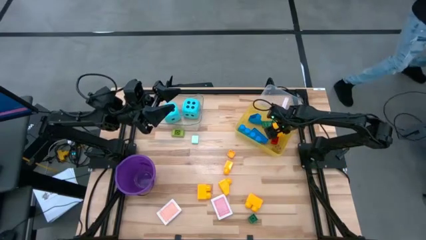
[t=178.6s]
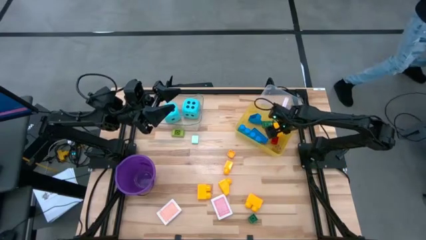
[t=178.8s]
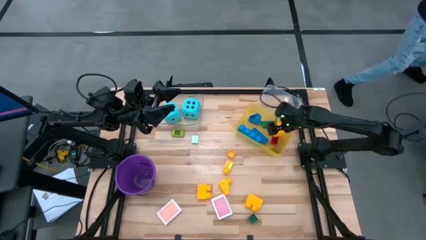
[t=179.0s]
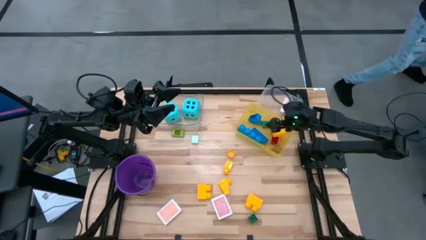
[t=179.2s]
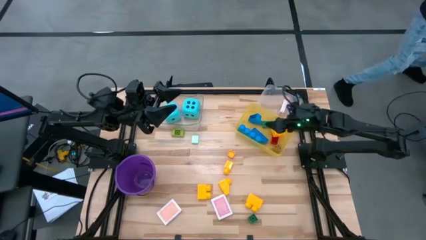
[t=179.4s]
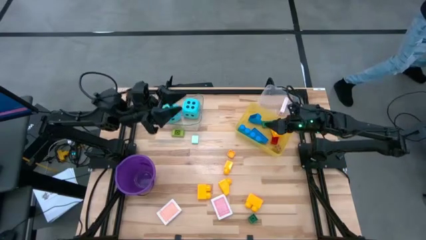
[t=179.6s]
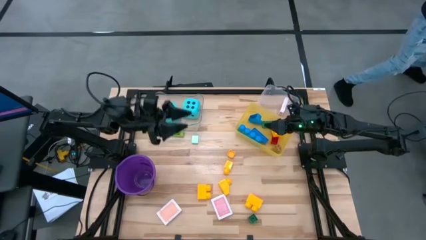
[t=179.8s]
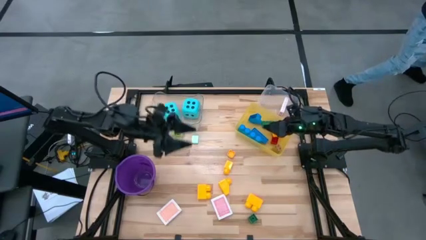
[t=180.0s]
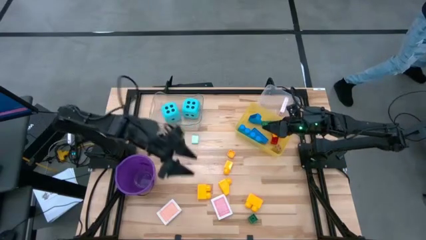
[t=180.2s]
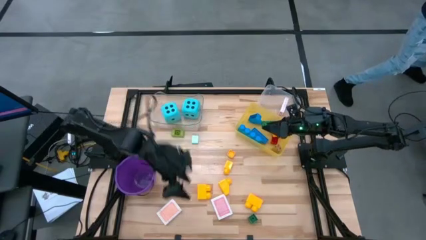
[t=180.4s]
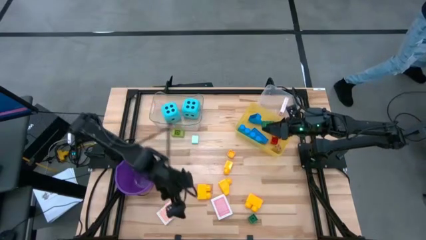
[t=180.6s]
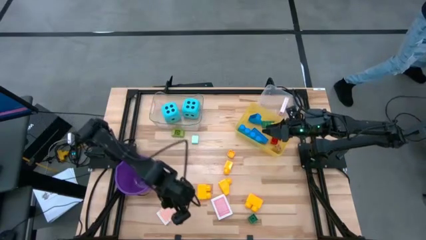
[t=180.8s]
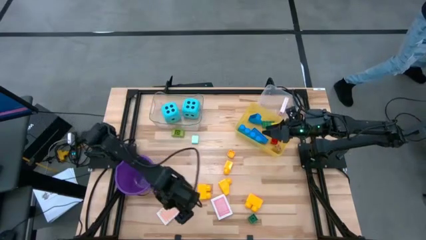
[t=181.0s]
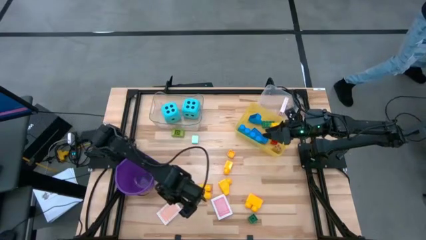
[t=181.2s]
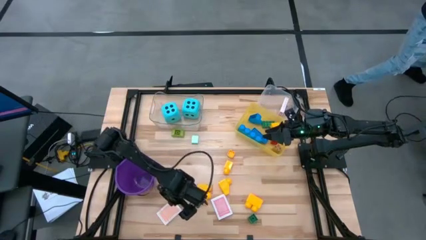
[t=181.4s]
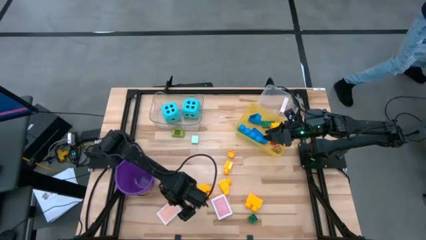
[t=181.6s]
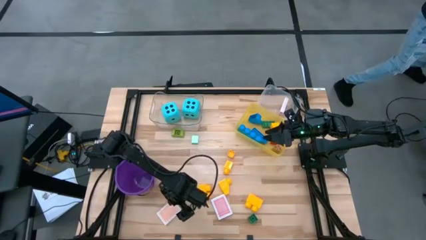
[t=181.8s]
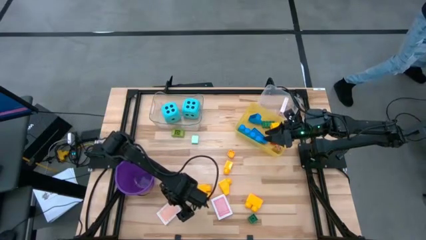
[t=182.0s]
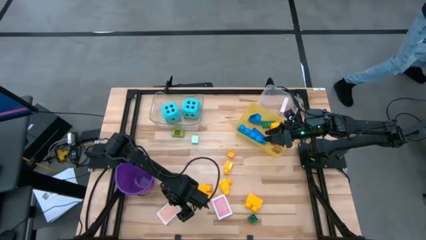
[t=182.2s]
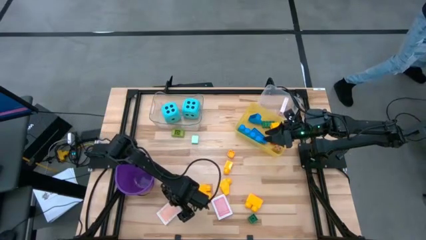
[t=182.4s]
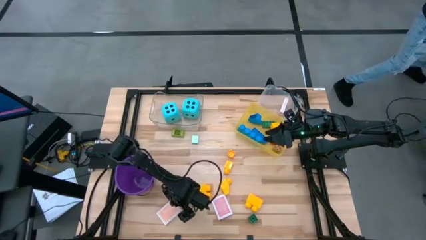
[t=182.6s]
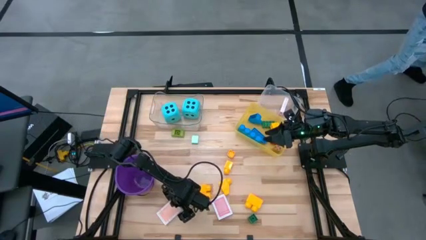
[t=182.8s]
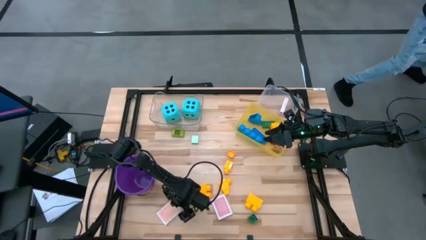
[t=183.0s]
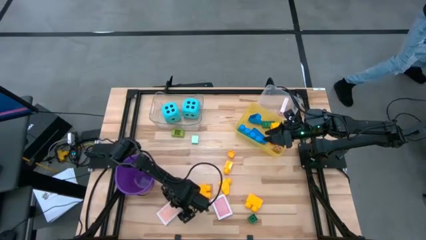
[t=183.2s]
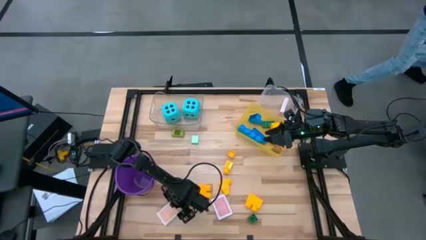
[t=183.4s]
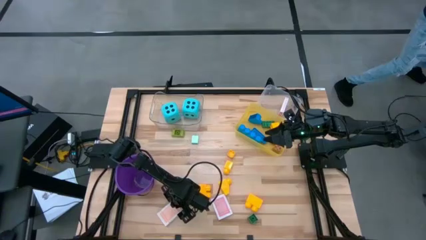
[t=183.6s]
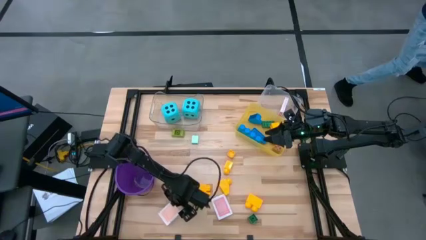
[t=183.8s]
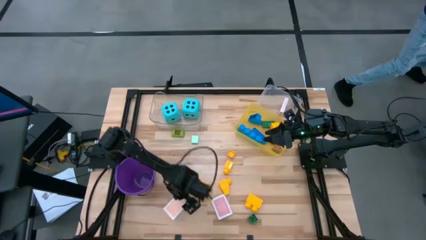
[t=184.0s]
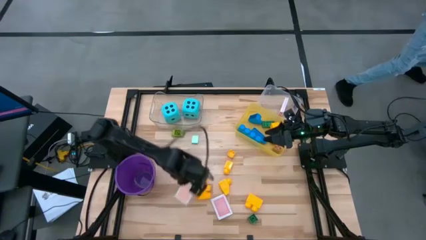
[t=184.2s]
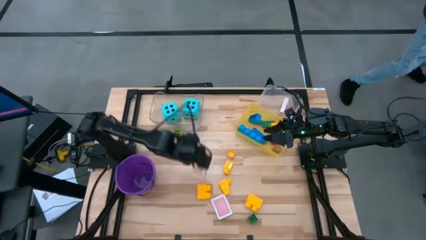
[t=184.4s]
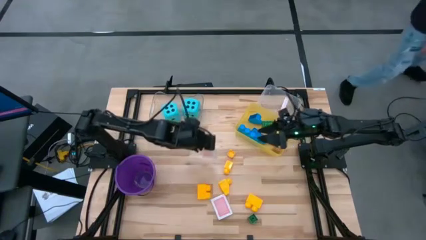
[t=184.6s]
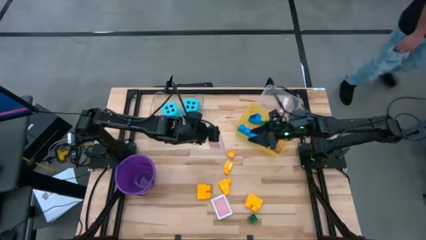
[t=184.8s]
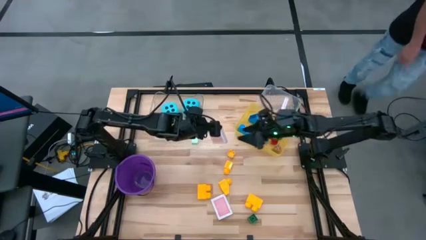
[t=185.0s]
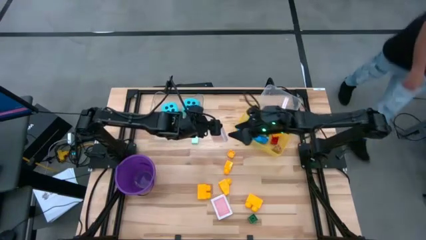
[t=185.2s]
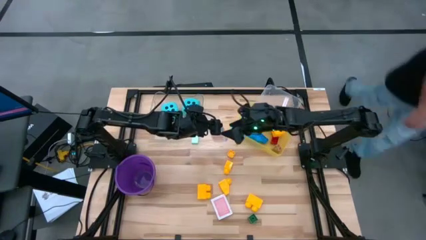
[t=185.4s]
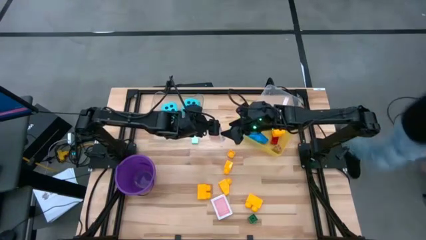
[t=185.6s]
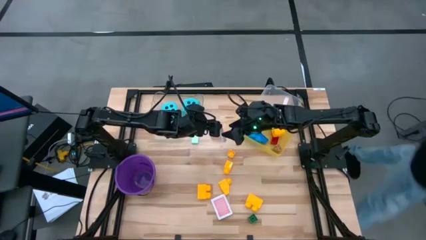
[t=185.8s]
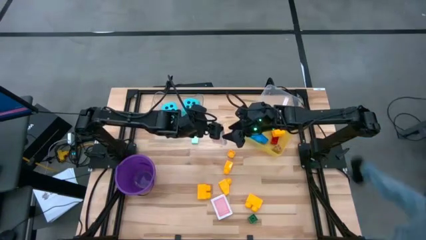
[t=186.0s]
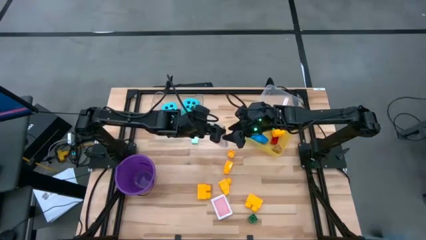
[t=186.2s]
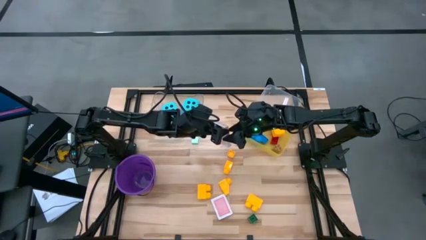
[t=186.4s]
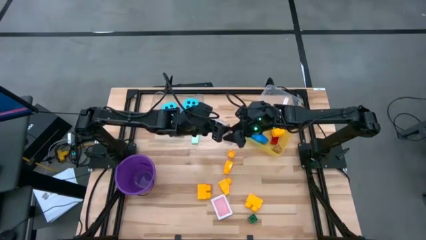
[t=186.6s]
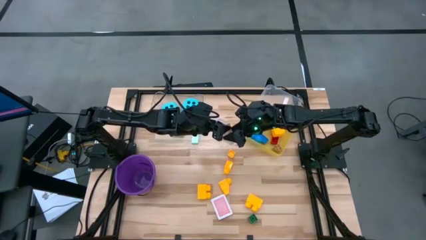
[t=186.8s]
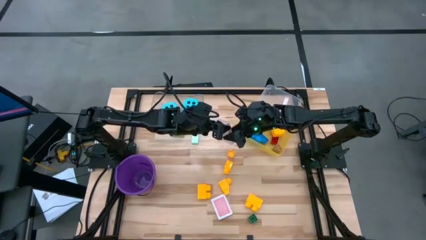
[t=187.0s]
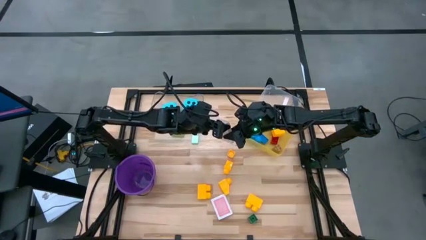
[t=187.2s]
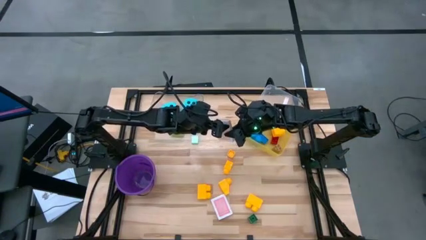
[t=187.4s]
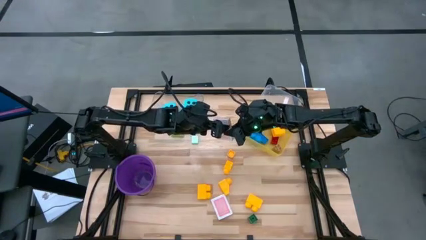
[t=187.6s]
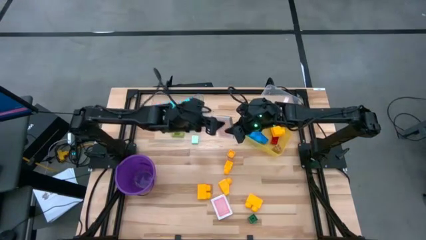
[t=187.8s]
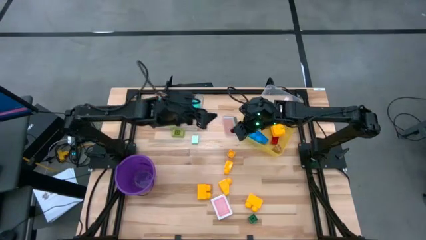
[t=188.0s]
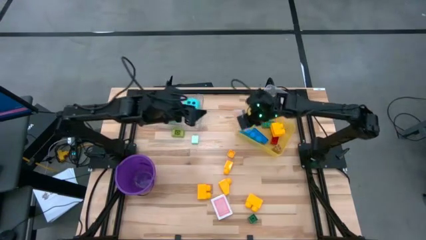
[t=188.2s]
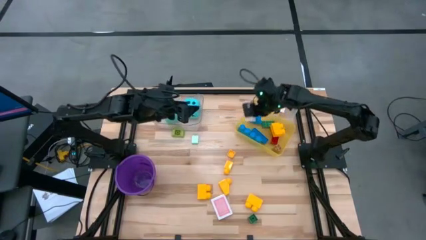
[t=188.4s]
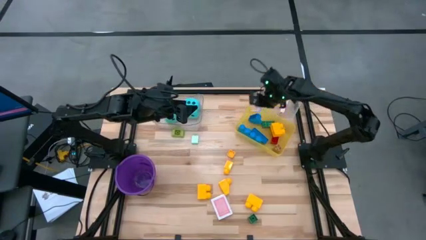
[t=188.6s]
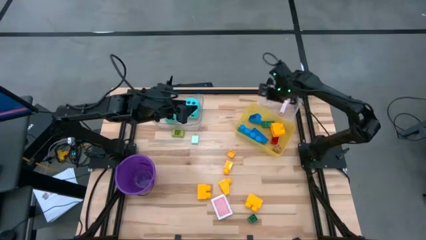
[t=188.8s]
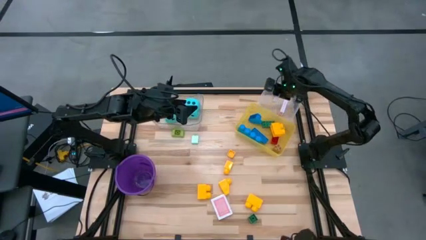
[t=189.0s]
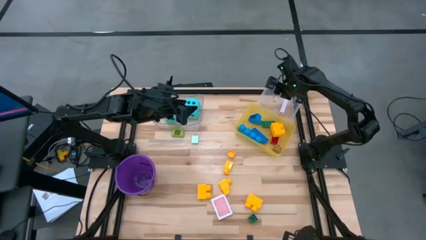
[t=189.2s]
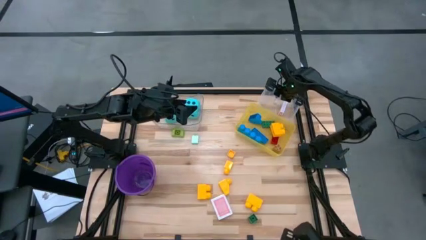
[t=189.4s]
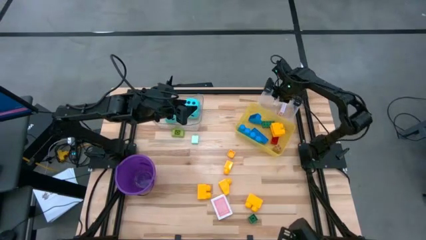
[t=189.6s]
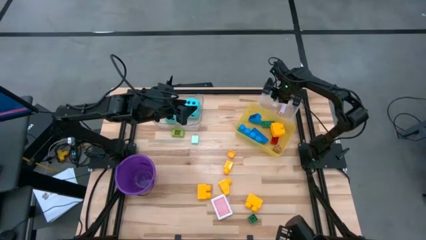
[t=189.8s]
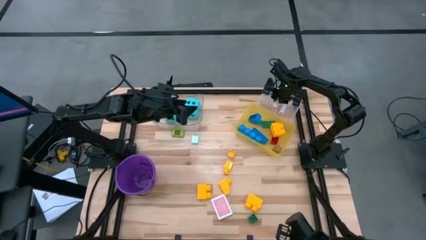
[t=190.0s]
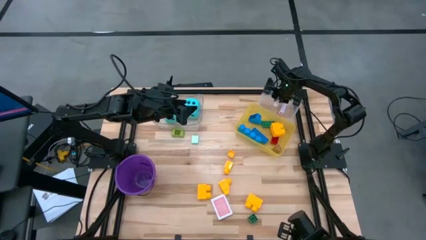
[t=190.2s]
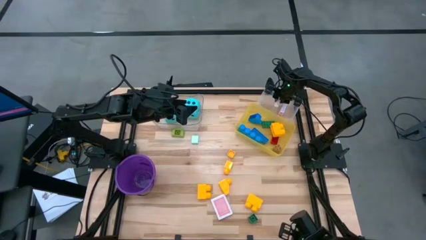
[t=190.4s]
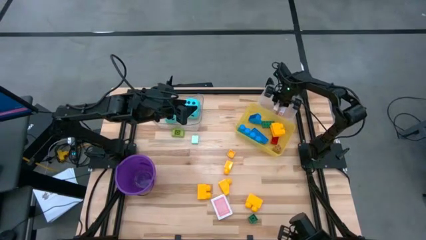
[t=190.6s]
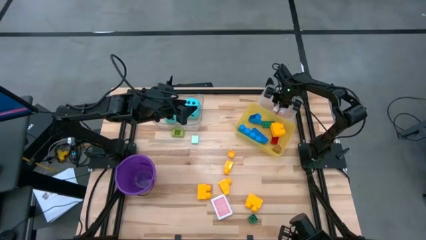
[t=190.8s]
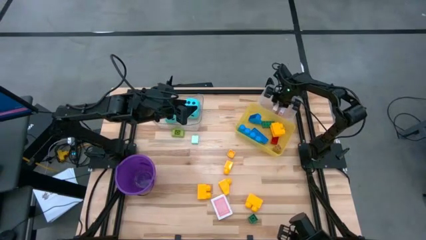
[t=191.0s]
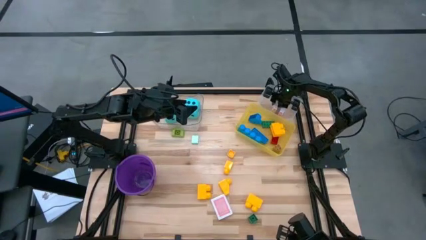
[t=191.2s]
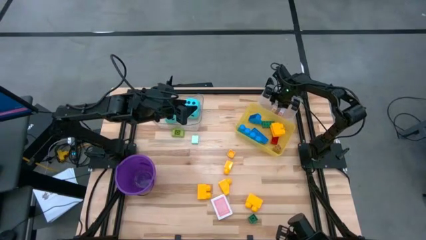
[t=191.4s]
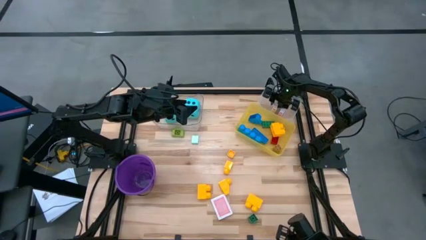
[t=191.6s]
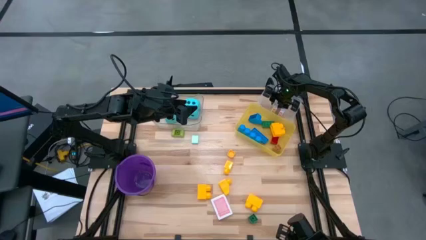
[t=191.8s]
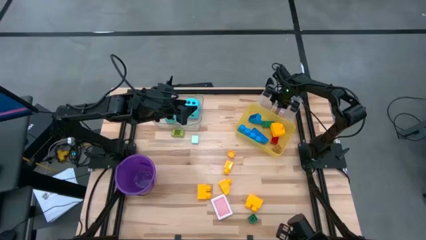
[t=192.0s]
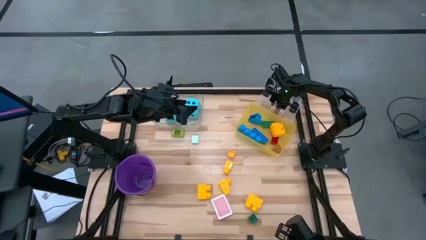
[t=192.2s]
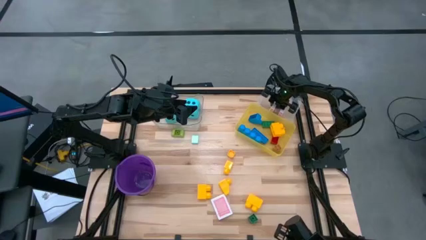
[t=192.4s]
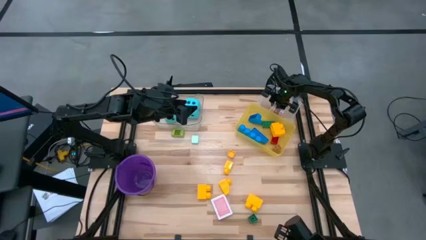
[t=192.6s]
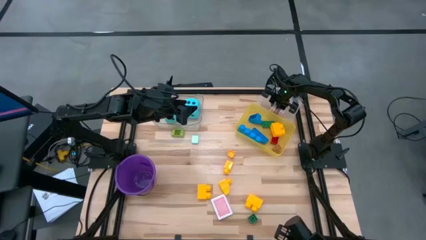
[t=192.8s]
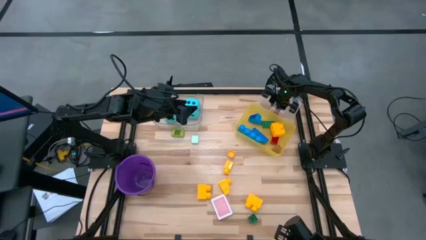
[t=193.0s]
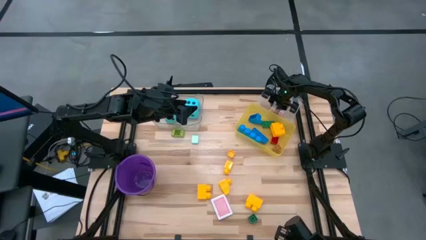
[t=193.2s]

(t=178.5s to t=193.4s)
Task: Pick & Place Toys
Put the orange deck of cards into the white bin
